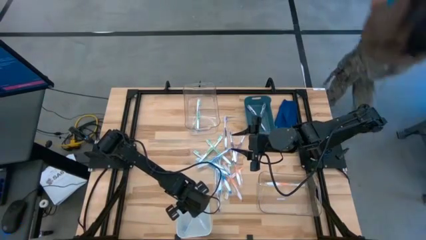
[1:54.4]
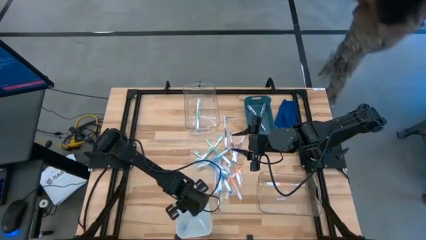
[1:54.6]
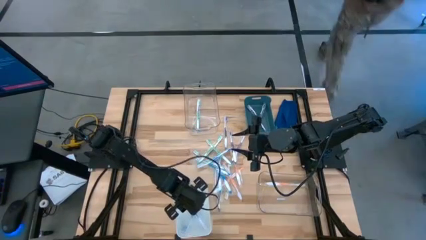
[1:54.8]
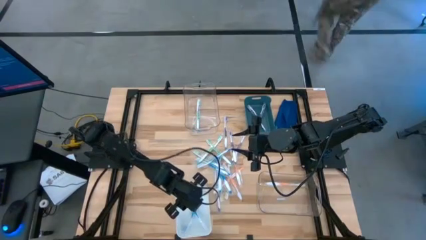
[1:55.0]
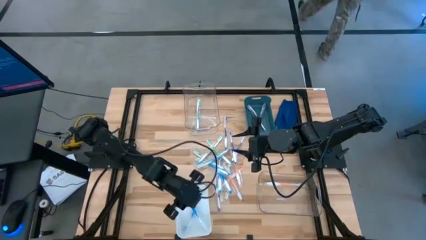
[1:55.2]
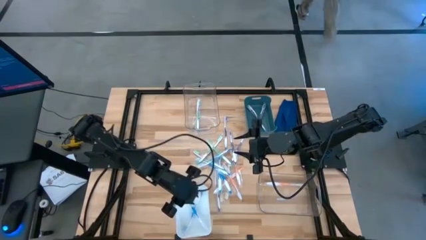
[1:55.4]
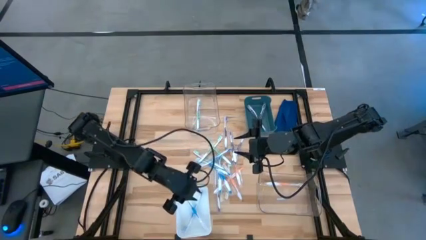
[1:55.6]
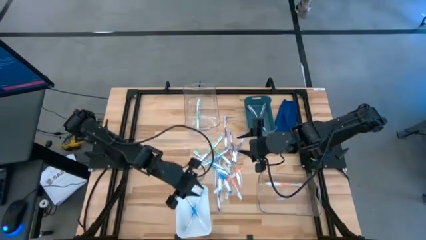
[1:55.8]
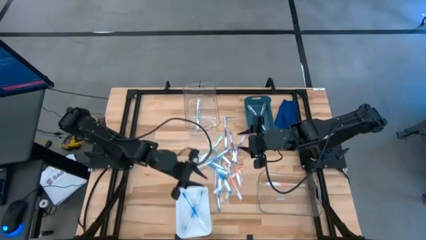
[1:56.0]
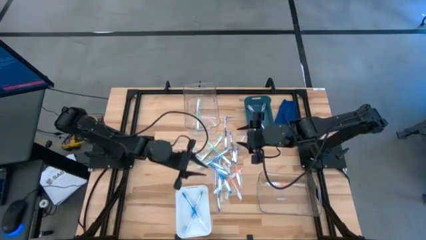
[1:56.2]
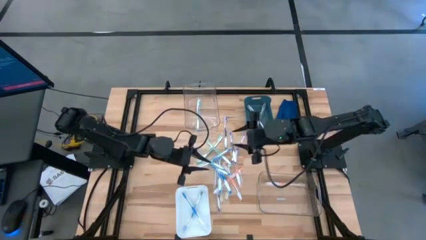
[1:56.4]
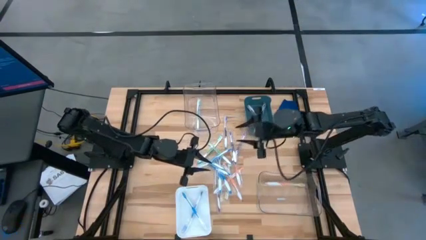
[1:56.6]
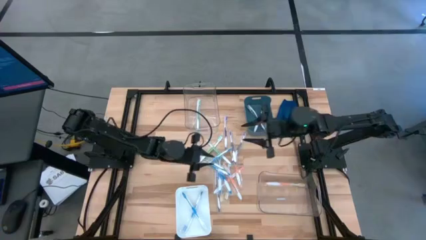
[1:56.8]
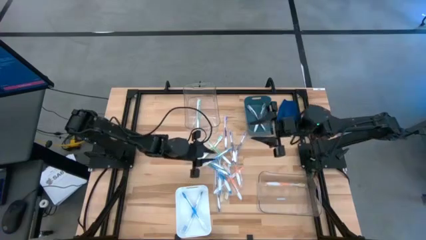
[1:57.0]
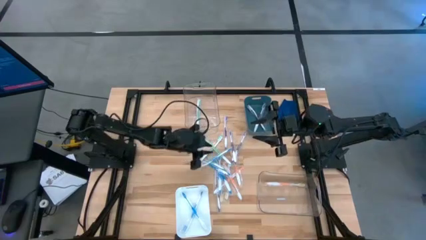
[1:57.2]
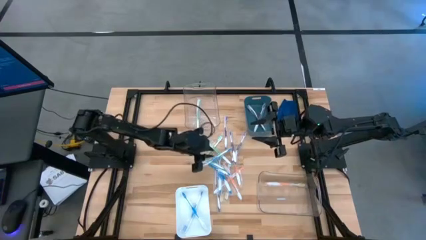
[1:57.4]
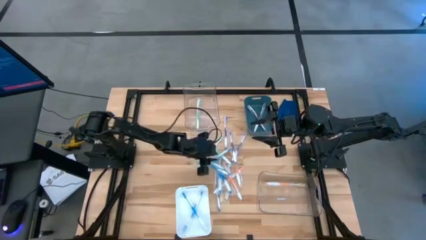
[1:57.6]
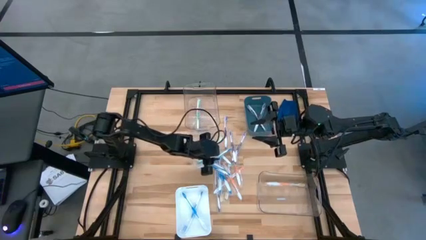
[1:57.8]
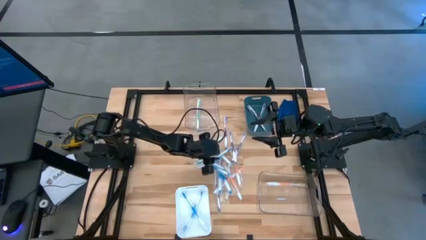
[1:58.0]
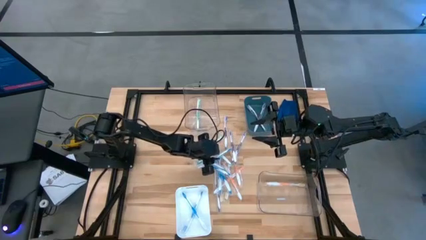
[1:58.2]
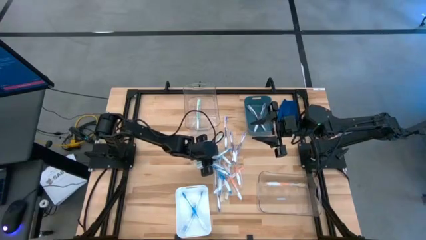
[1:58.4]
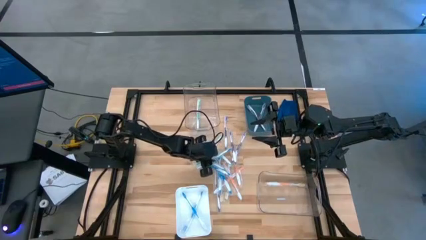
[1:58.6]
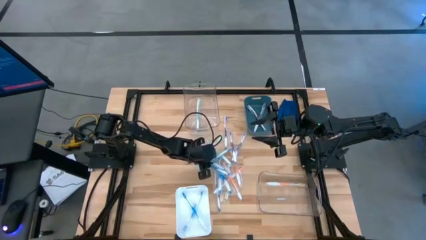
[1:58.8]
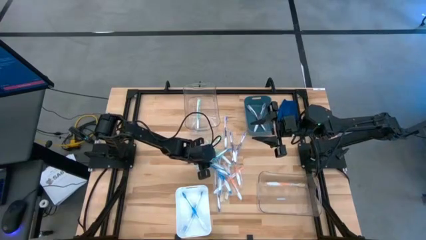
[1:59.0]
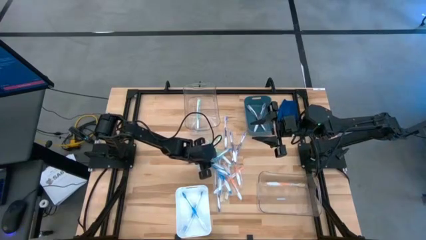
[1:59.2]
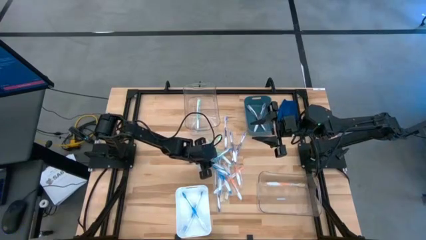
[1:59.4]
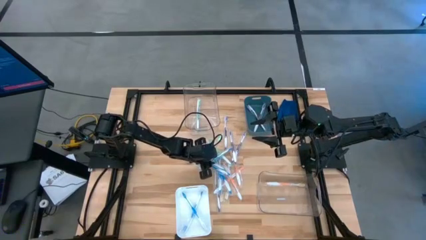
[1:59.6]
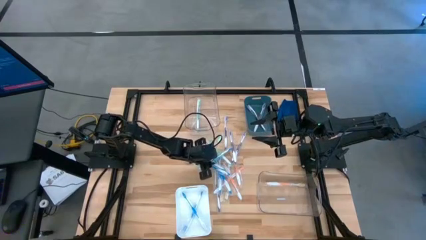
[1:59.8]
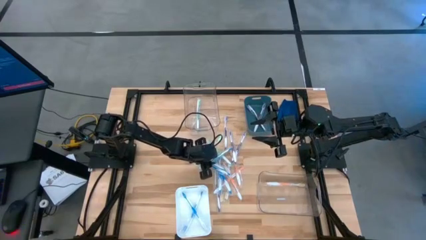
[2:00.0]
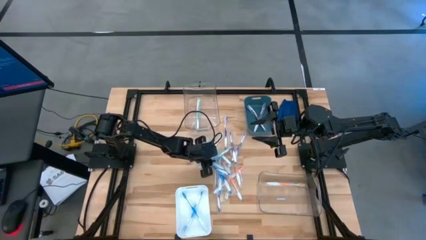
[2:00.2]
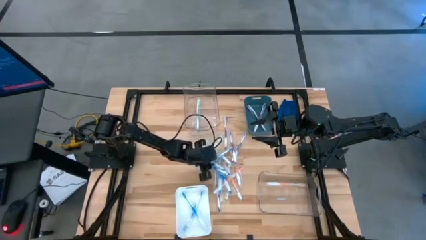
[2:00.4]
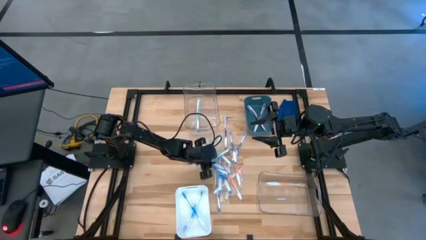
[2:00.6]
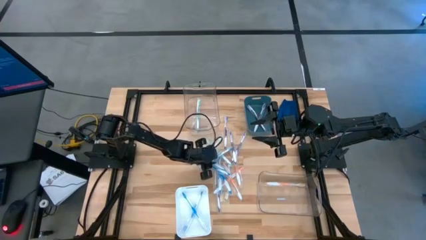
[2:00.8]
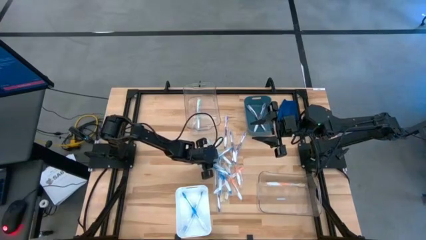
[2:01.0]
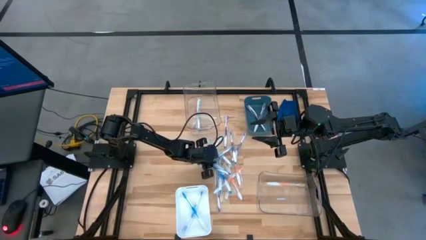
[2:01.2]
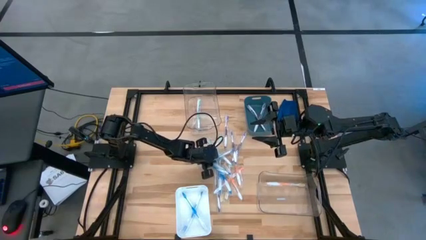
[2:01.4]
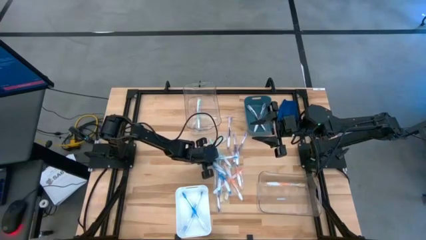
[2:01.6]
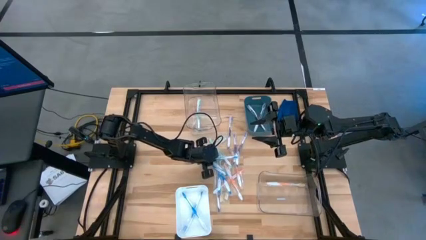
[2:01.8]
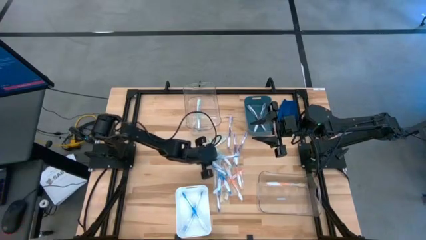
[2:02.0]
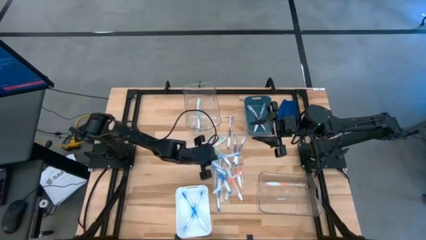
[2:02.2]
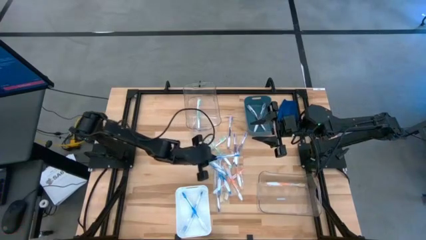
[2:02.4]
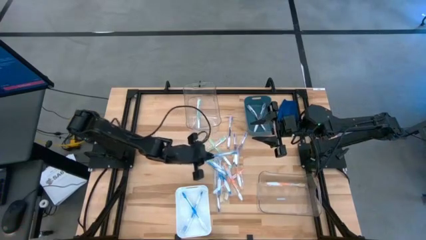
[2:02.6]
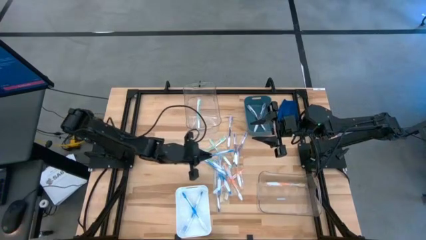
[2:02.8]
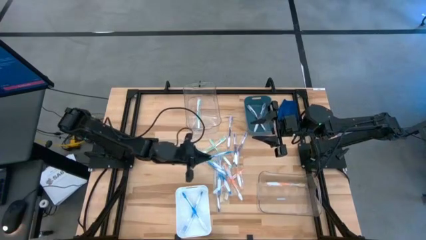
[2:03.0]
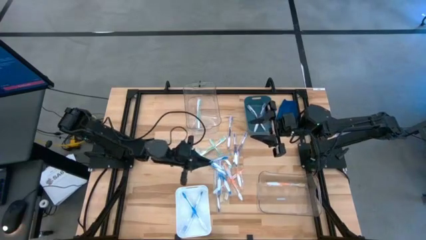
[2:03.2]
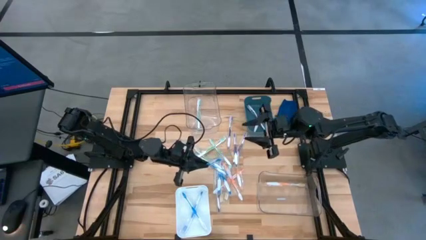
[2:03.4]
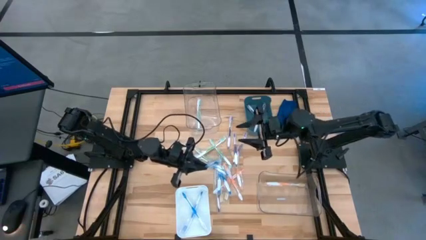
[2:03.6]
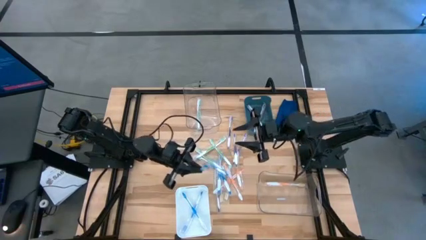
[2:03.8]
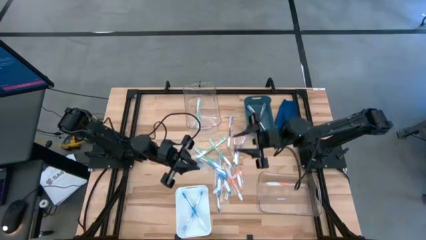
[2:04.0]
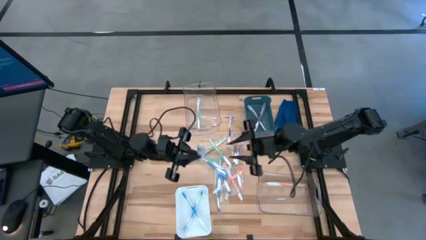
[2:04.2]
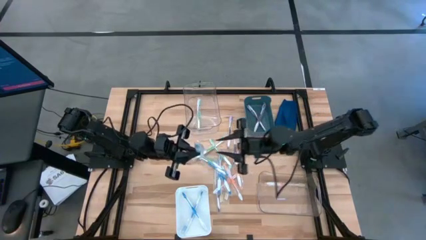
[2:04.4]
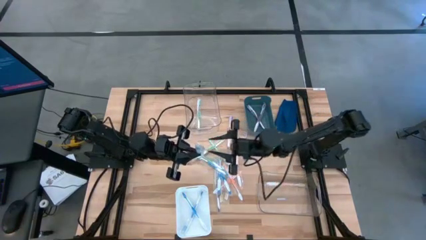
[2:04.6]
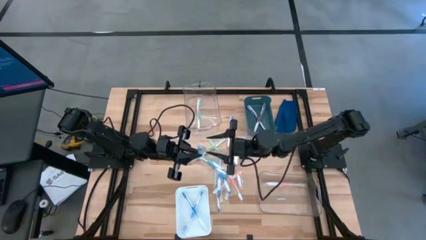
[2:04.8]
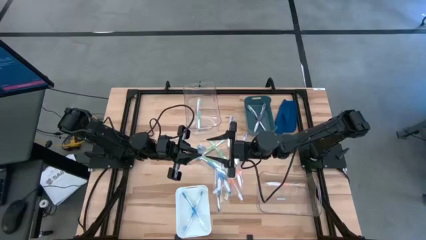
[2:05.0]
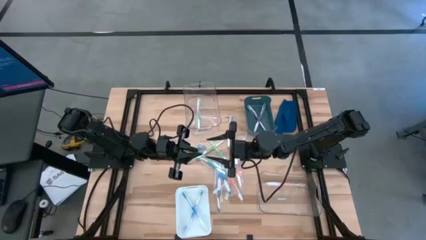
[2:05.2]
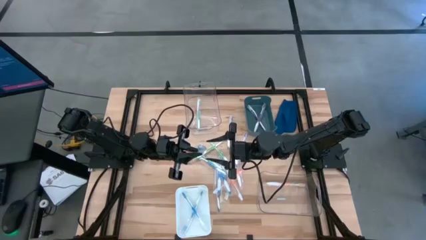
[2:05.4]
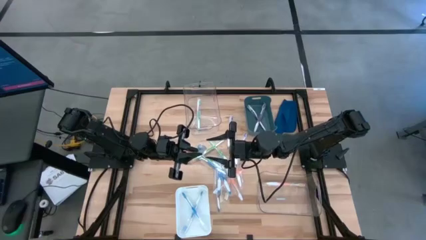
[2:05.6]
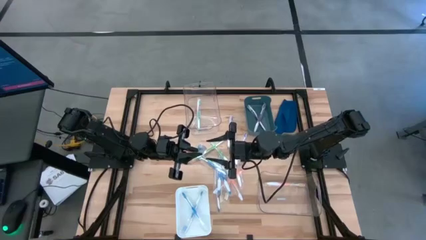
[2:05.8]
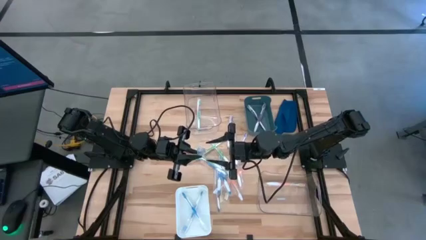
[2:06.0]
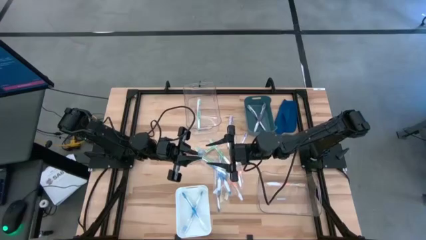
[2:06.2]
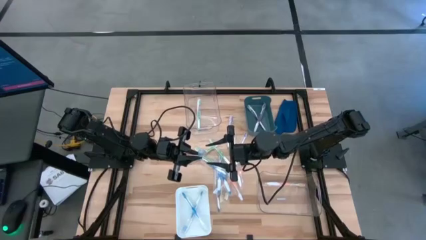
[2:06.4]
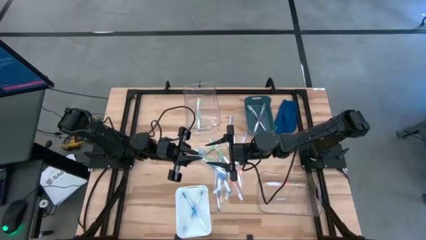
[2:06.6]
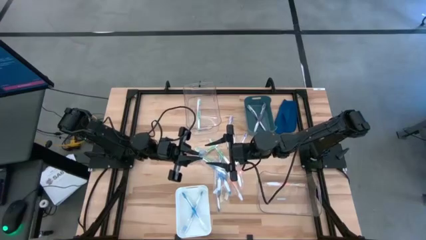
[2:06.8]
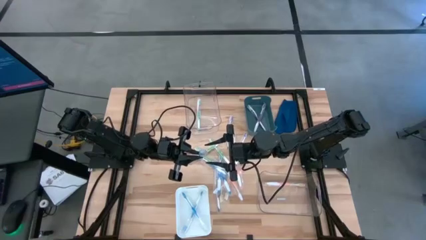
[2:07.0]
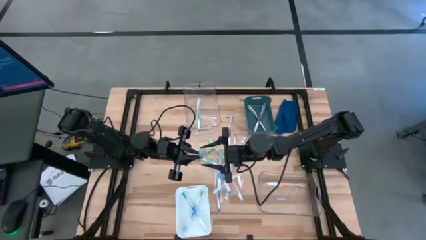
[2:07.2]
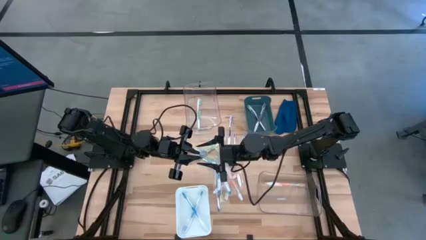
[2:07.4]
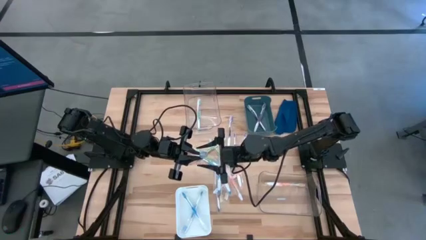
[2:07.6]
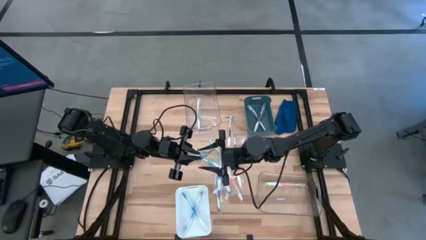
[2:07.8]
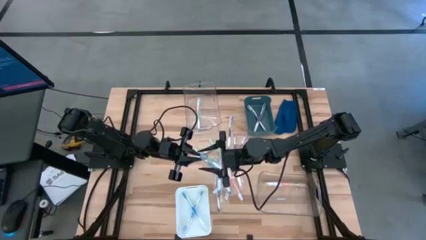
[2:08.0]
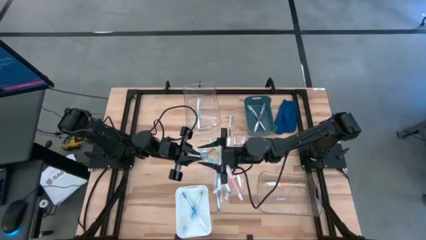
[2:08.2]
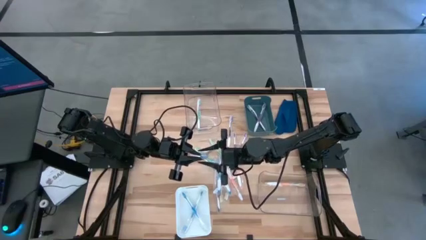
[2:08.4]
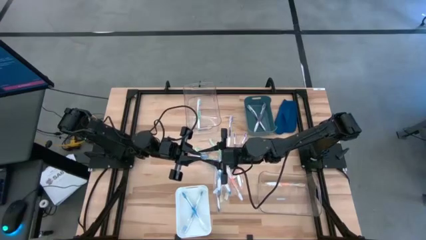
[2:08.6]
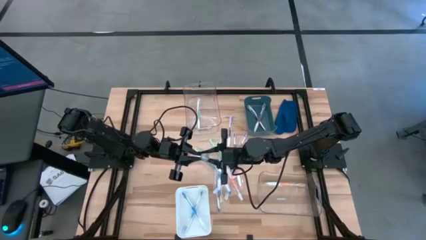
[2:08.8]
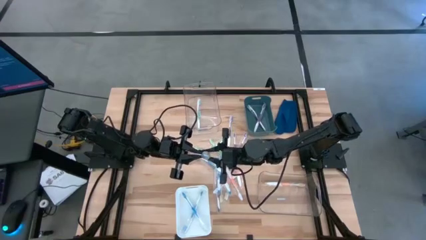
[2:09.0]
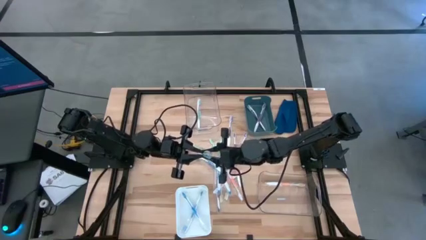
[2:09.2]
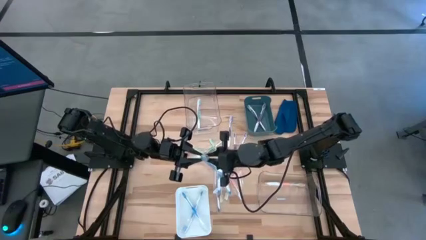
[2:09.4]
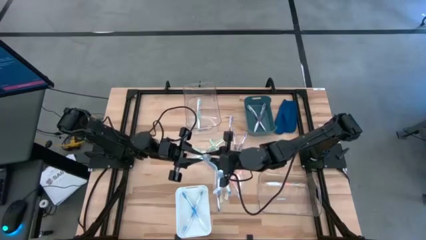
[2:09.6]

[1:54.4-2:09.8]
Task: Pick & Place Toothbrushes
Put the blue toothbrush into the white bin
